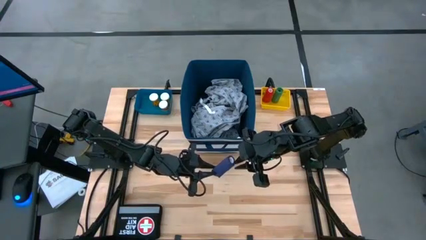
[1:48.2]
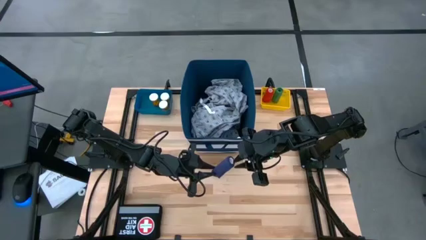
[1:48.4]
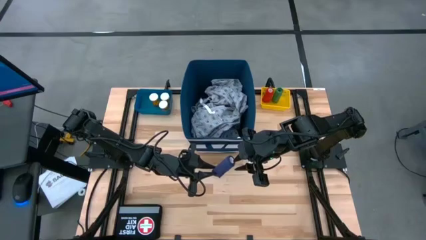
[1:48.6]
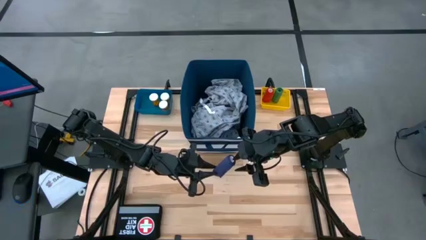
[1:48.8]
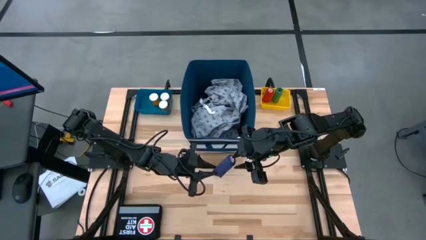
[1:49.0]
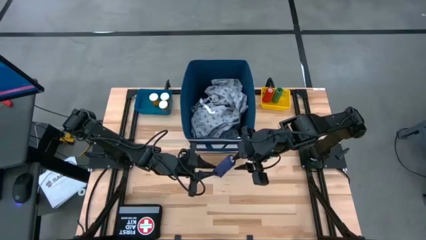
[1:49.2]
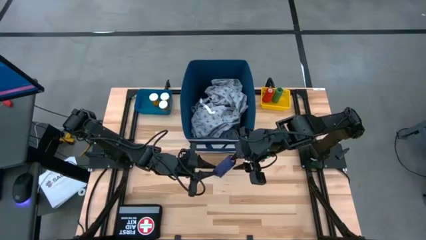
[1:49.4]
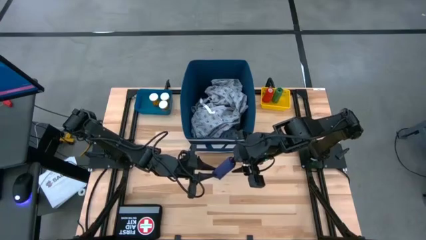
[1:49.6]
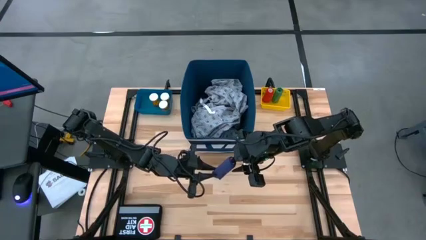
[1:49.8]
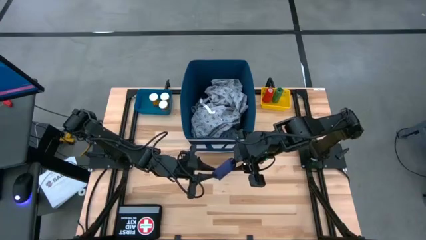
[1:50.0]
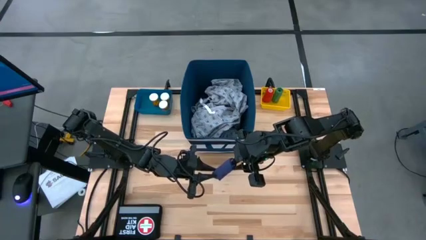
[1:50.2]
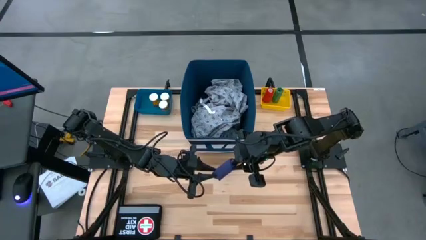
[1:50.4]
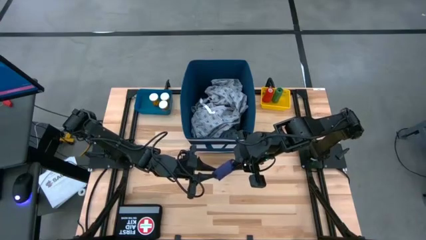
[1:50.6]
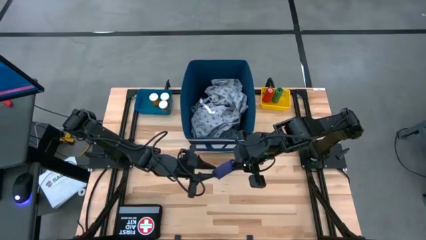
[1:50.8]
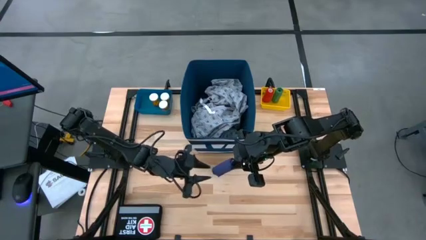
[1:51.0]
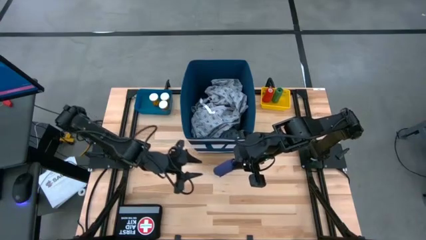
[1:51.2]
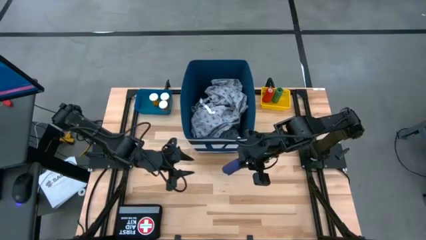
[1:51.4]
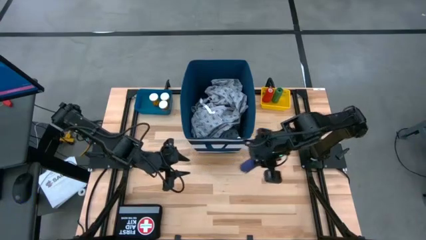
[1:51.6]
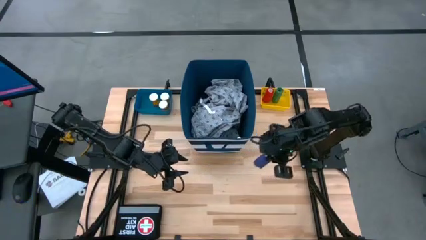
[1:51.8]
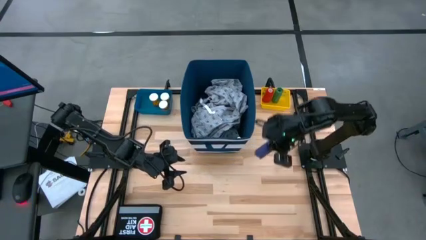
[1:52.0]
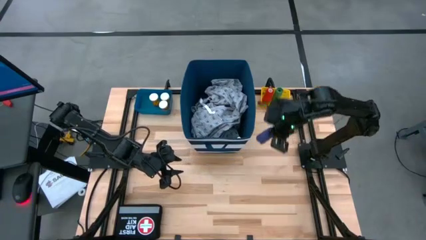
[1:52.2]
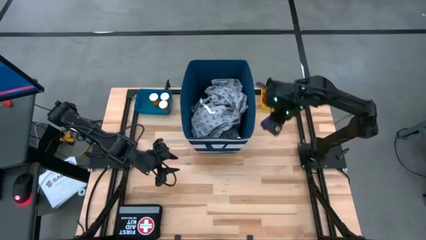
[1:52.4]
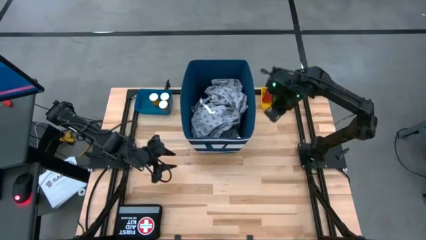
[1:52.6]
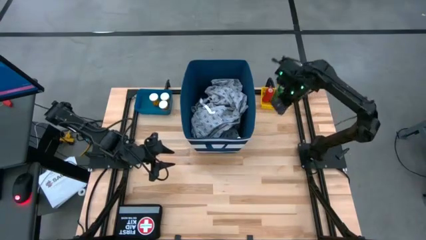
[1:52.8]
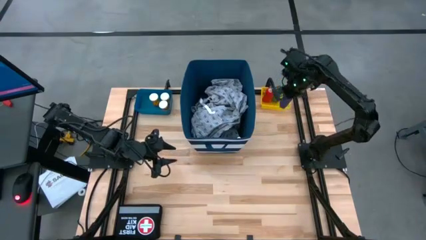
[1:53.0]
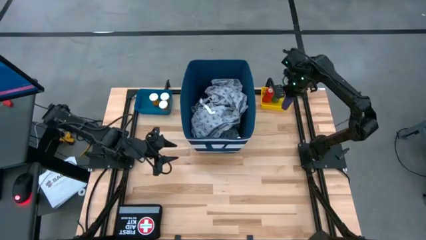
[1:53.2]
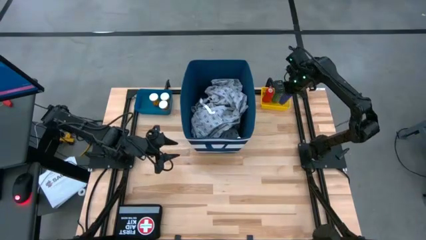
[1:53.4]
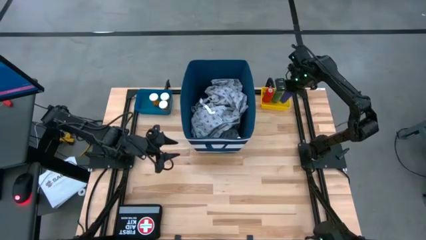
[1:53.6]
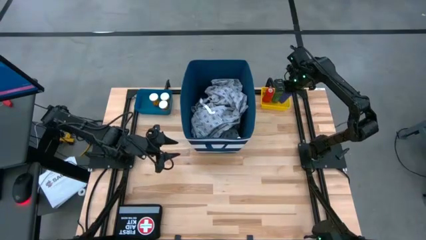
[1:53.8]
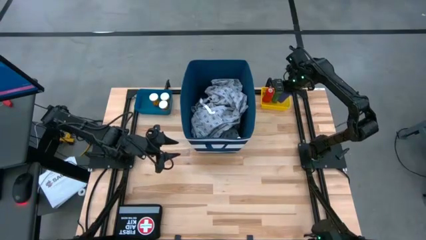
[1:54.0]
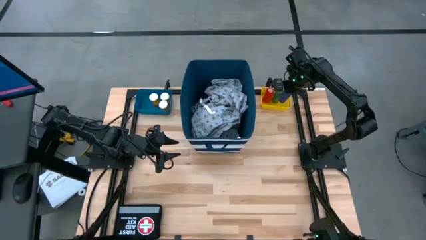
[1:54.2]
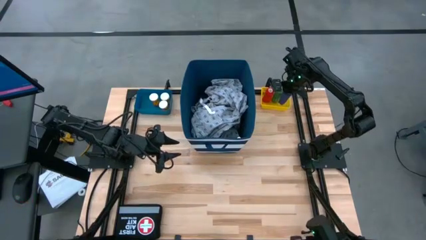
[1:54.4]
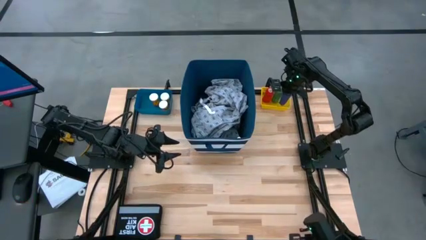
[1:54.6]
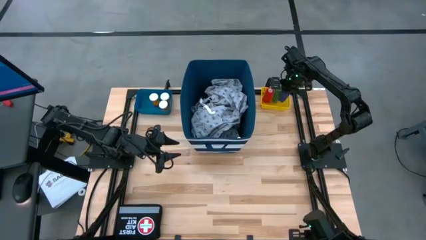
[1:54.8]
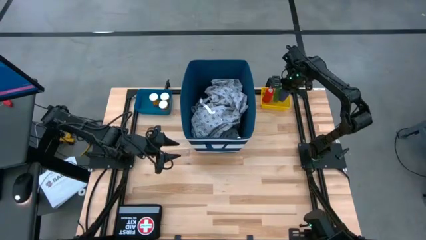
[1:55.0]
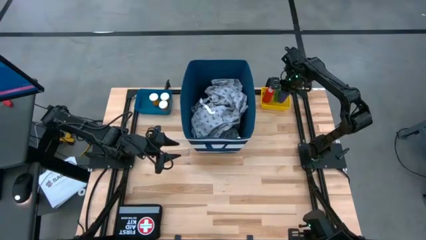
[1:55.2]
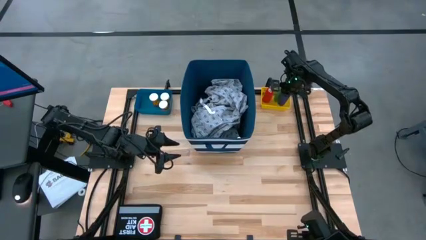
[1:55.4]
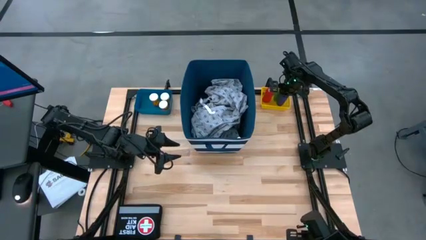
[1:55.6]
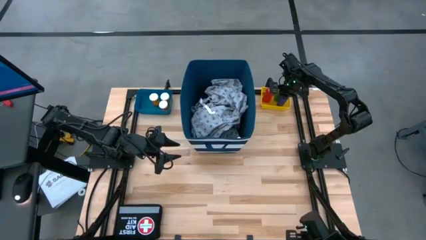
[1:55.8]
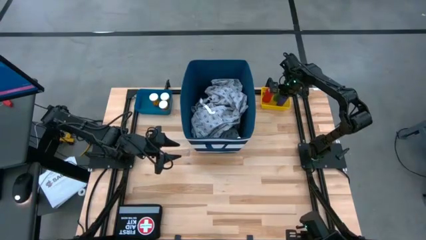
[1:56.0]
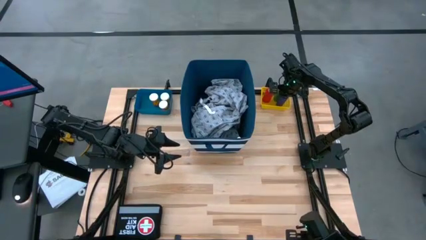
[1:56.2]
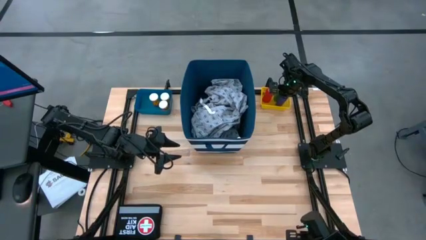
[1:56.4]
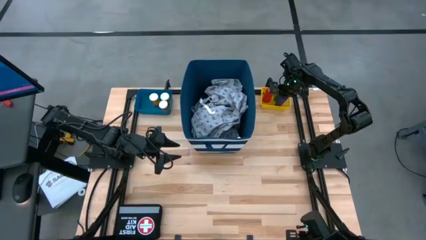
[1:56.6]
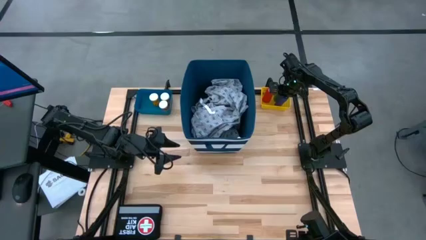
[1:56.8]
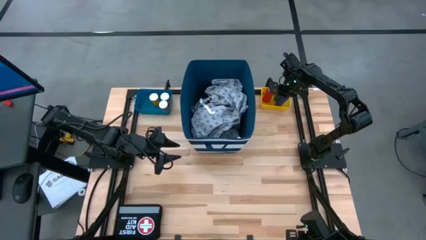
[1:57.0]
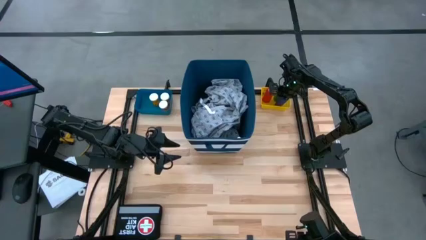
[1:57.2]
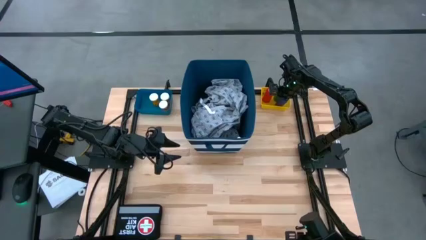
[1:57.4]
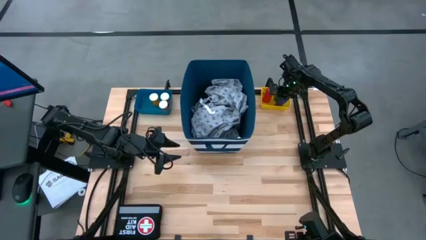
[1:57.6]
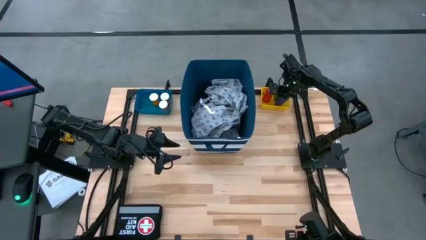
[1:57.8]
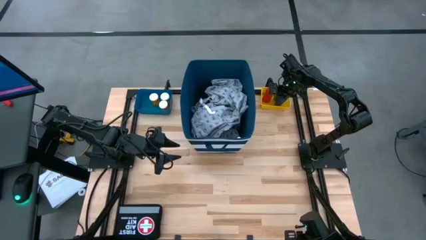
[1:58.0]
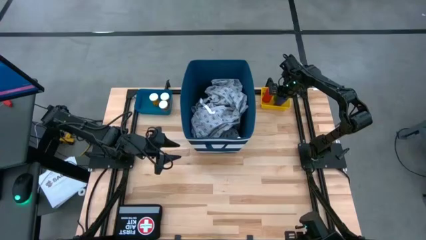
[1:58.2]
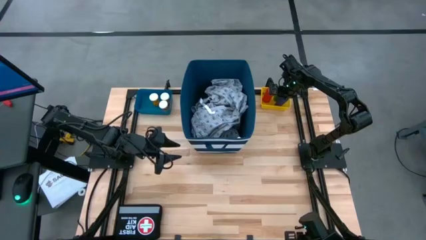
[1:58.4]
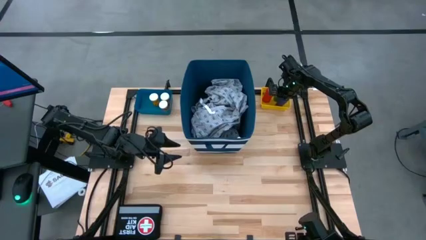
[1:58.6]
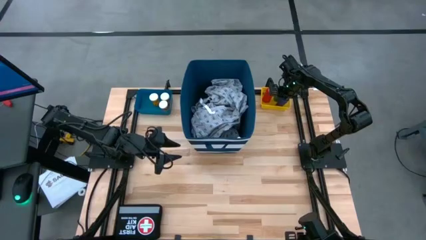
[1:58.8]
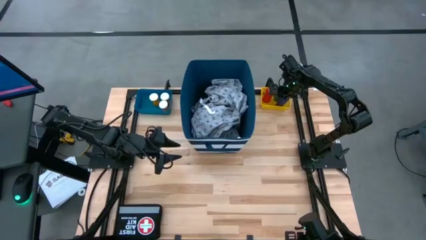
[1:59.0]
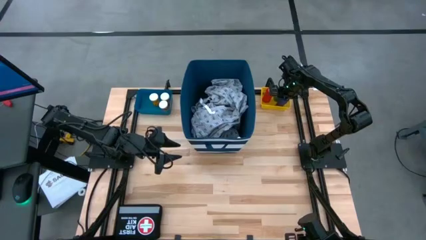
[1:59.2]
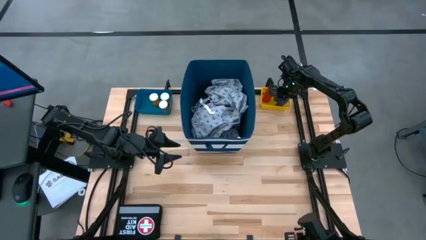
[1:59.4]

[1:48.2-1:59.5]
Task: Pick & place medical supplies in basket/bin
Put the purple bandage into the yellow bin
